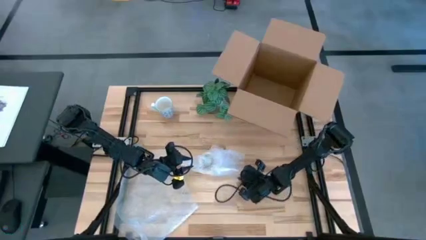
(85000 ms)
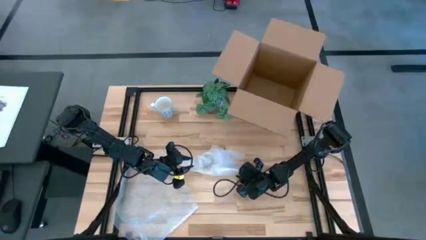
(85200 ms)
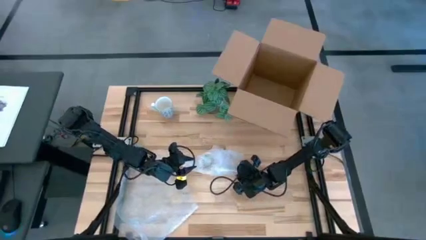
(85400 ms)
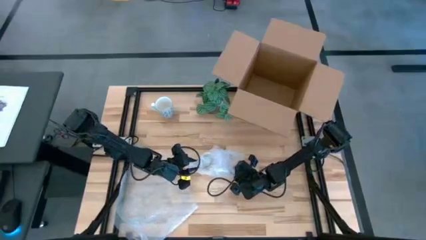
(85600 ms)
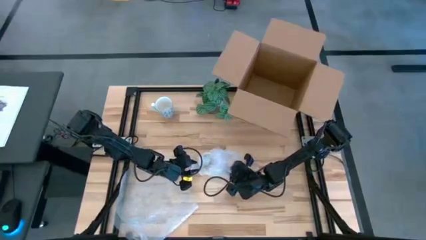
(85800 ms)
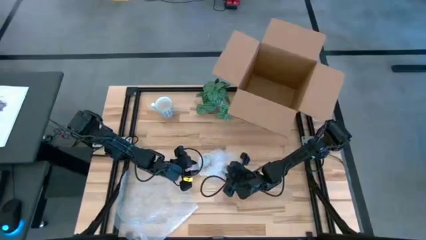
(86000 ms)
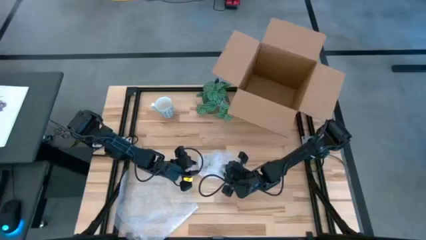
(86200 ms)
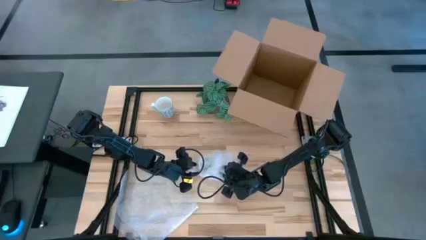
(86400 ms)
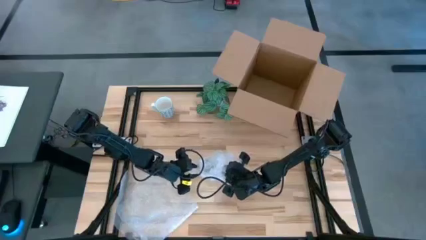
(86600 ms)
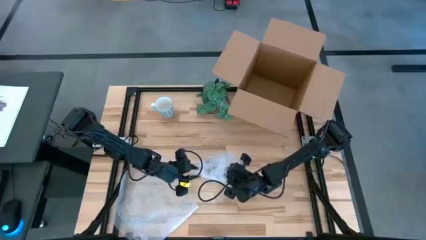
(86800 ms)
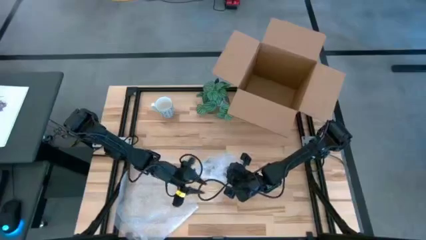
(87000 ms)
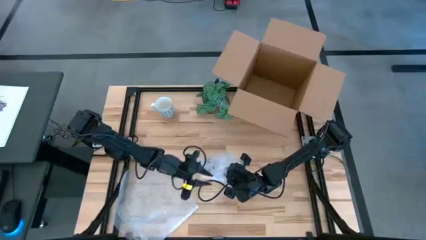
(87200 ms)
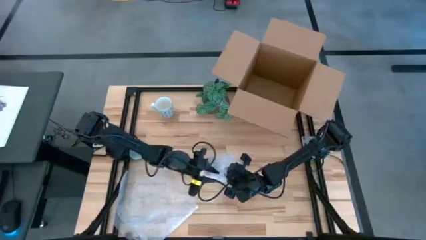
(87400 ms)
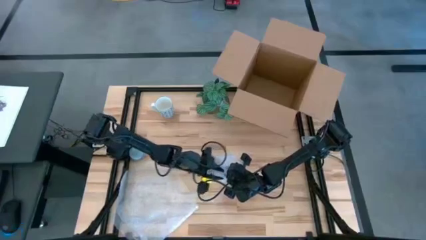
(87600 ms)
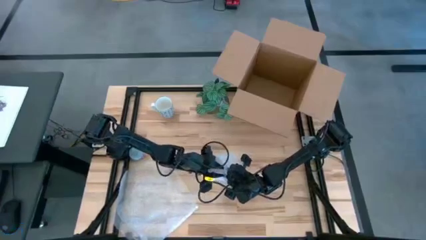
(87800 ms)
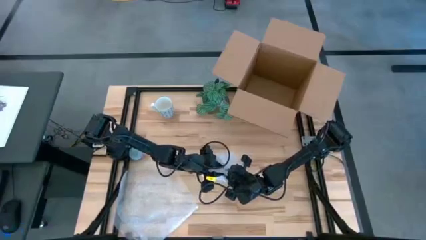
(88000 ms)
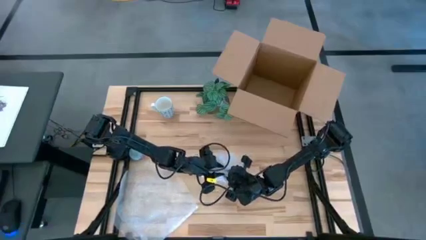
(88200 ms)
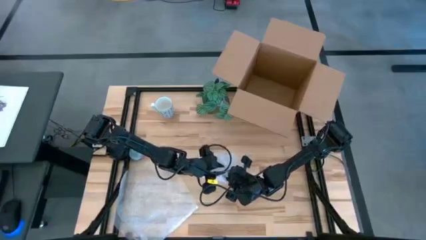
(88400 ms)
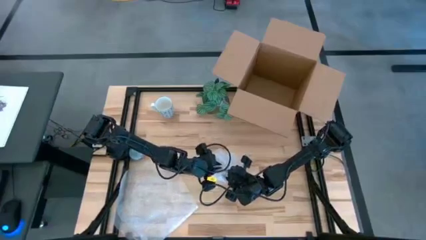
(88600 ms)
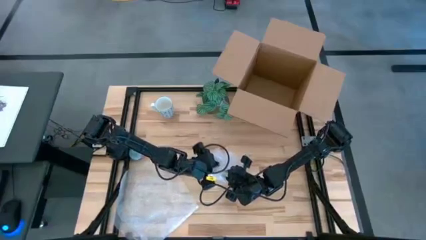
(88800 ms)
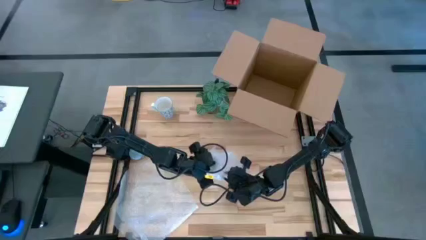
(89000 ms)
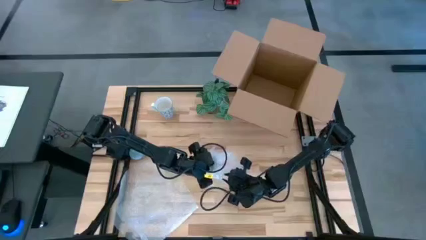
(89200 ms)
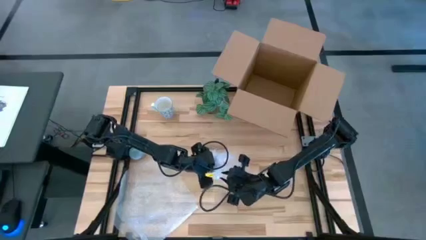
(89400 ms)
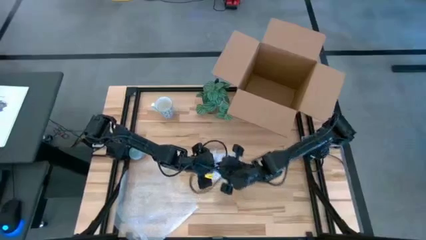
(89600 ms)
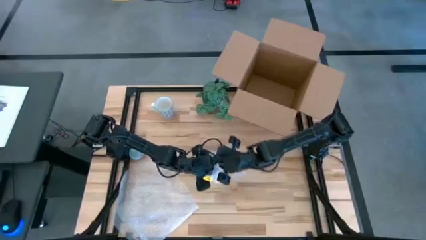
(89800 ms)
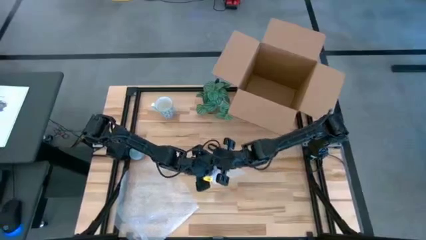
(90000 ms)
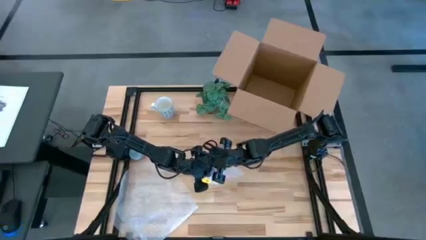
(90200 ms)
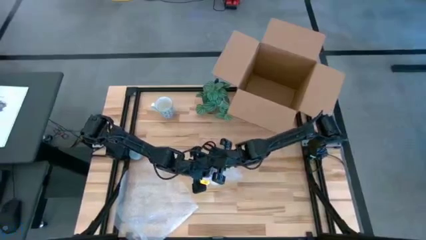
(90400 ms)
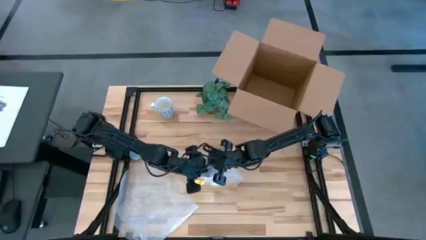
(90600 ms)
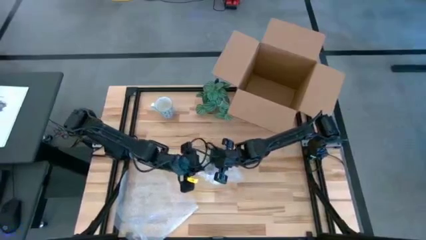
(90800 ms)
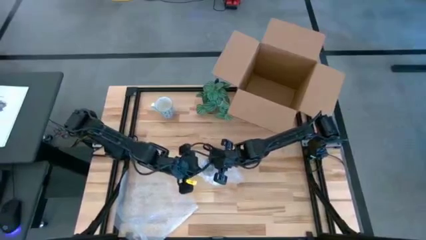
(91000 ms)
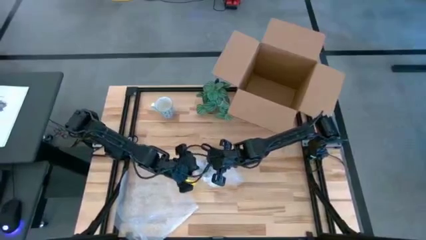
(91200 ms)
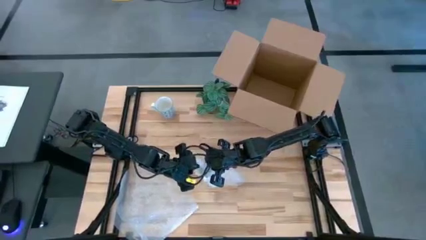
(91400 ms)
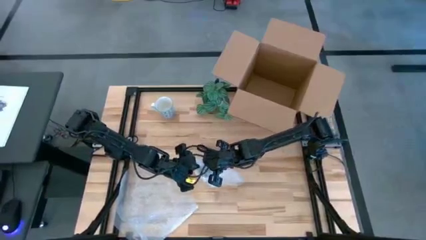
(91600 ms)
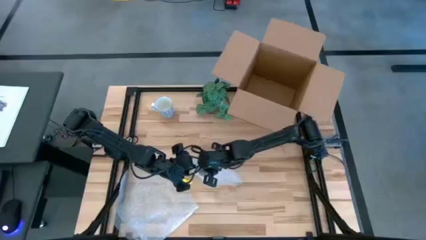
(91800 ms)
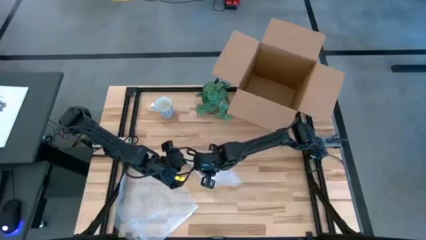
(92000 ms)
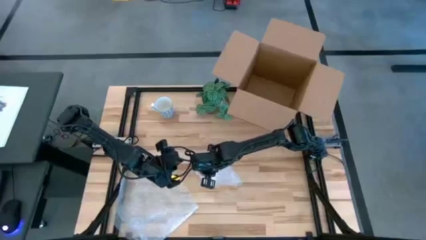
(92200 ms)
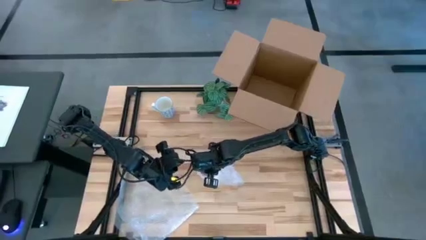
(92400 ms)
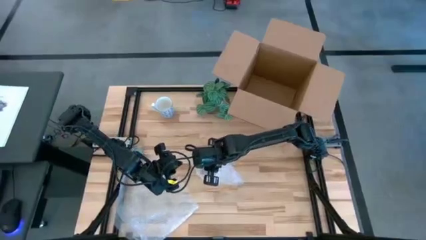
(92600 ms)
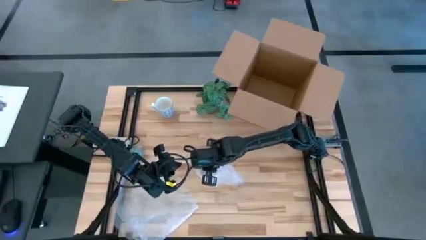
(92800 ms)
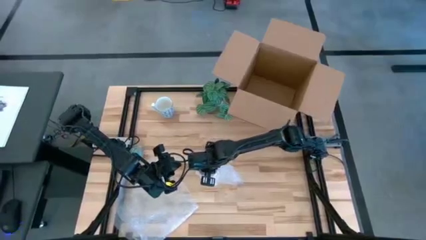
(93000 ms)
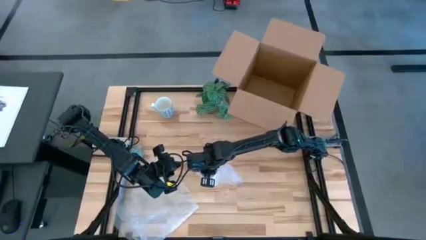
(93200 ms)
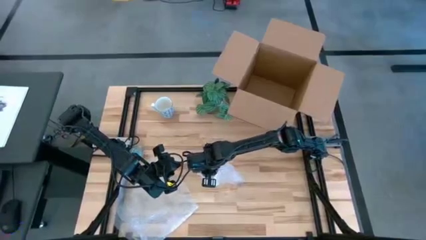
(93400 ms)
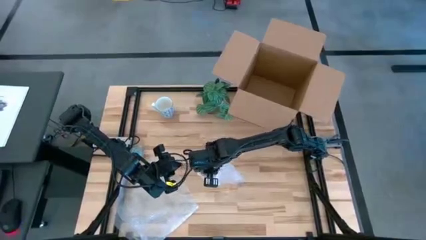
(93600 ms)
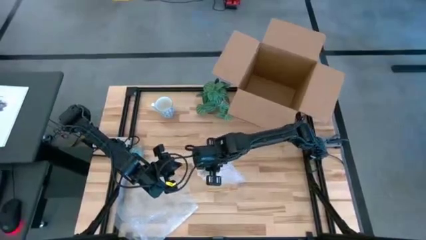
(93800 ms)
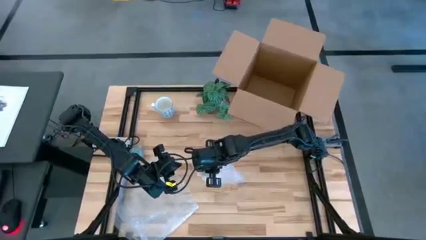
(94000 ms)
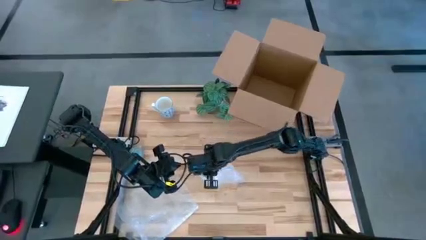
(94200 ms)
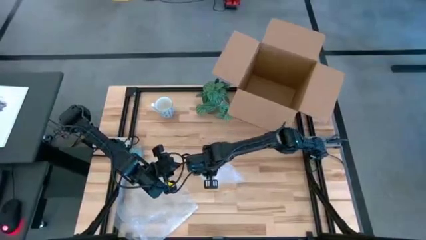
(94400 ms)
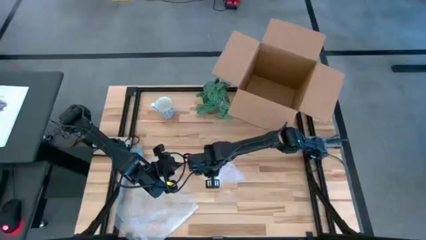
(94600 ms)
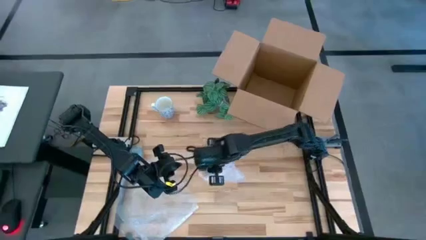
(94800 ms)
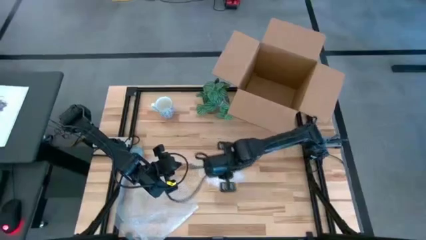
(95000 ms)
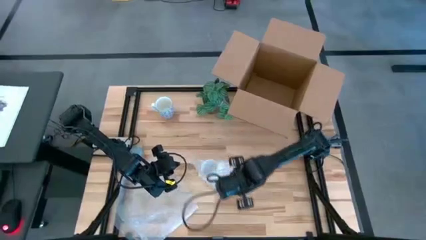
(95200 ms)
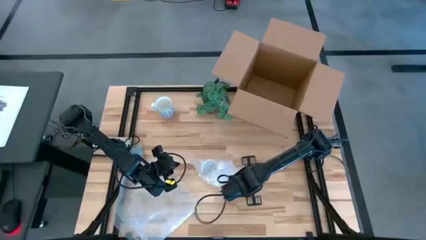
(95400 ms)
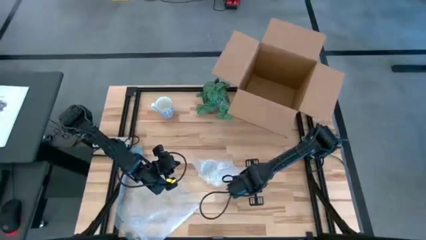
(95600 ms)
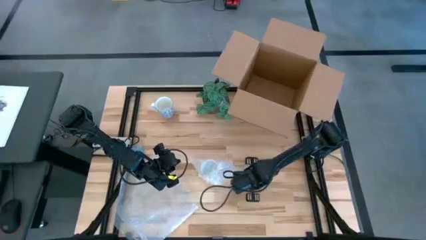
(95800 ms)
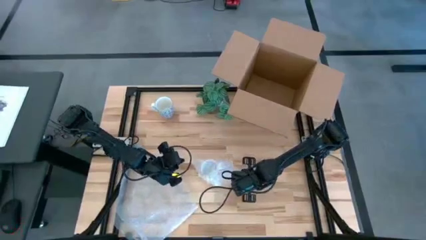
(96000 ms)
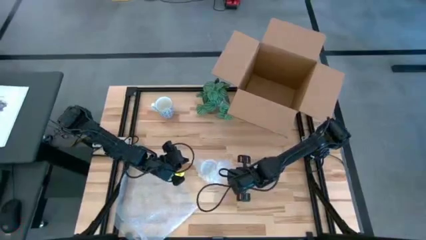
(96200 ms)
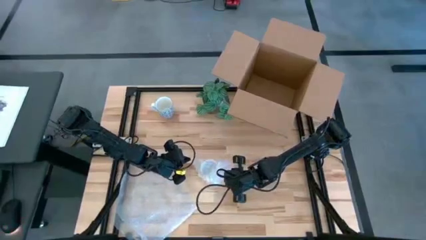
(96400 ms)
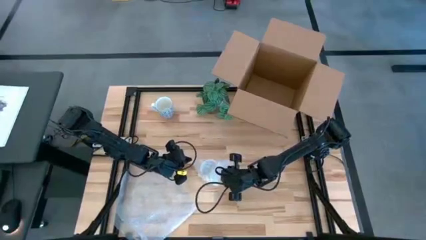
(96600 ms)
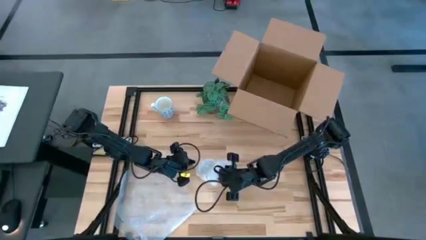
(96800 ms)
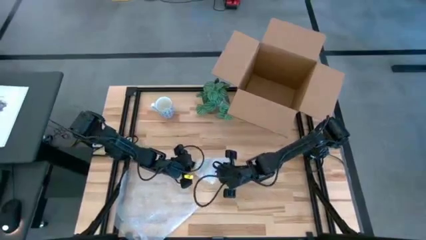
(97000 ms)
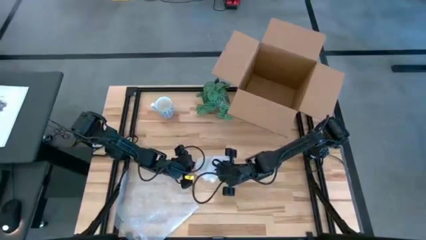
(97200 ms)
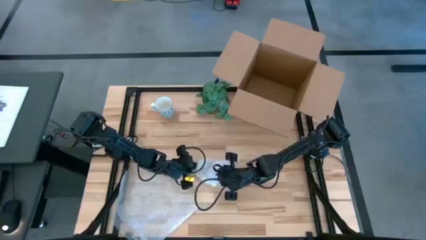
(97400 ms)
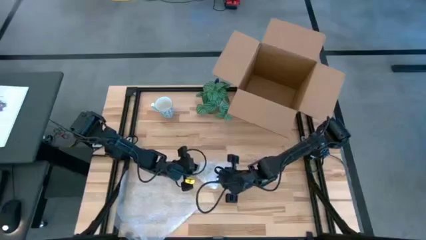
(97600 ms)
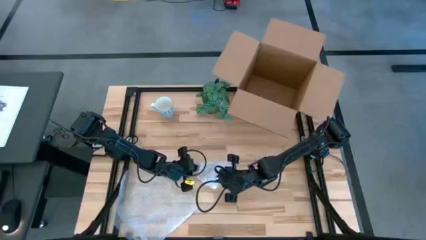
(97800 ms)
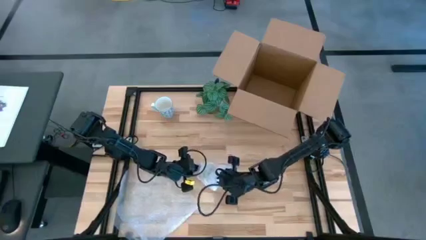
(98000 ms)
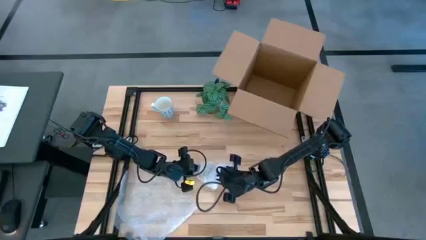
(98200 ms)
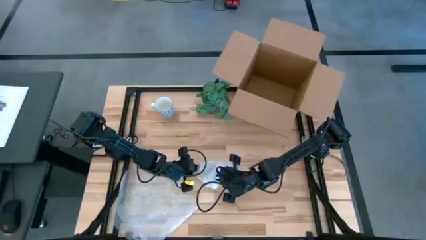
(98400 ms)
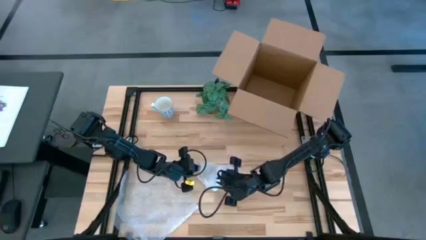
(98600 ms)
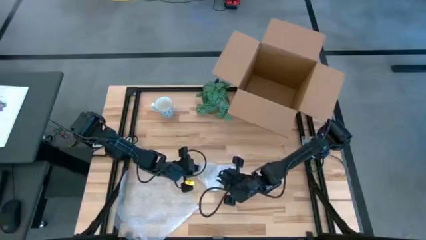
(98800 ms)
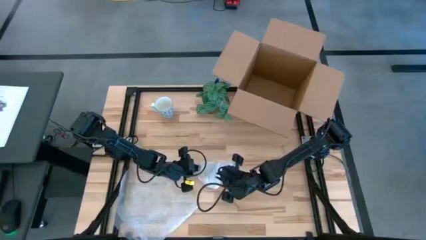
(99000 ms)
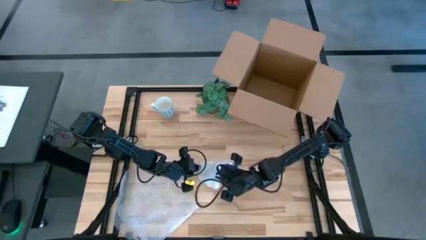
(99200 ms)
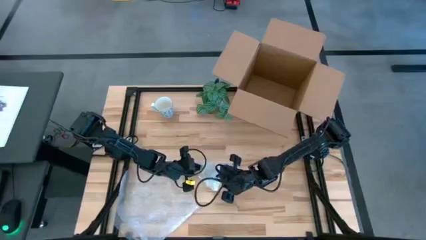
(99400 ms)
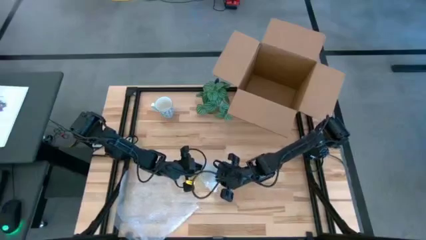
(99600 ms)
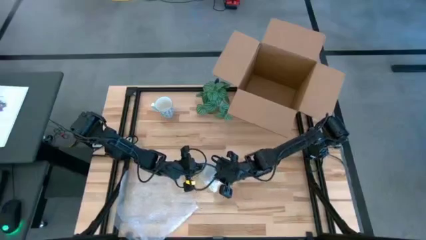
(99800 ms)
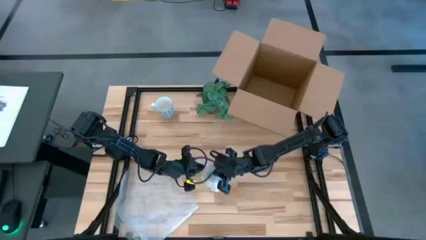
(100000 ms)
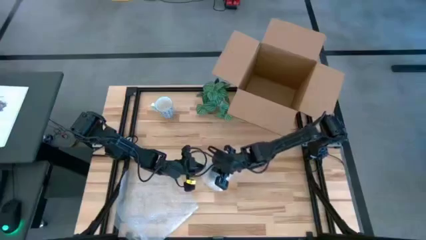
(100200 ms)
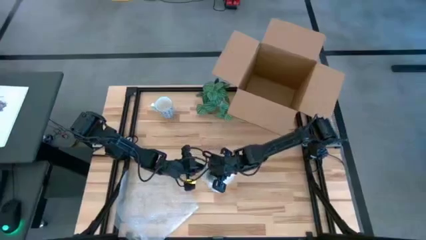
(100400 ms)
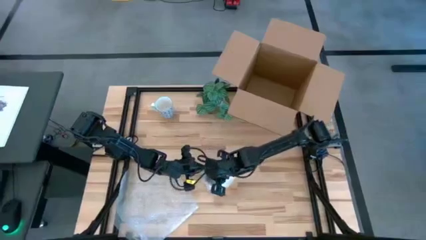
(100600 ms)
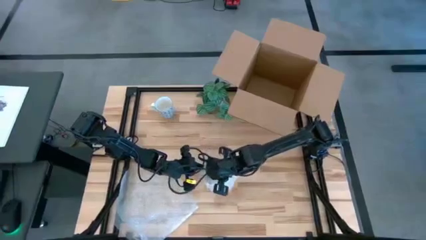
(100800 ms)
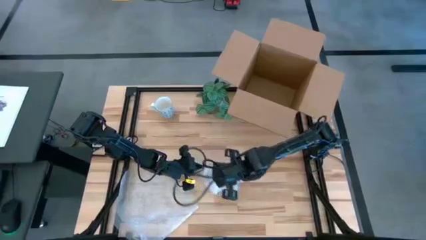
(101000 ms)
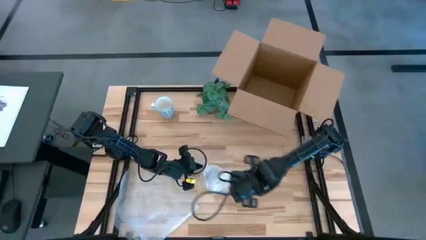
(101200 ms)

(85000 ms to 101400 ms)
Task: wrap mug
Wrap the yellow mug
